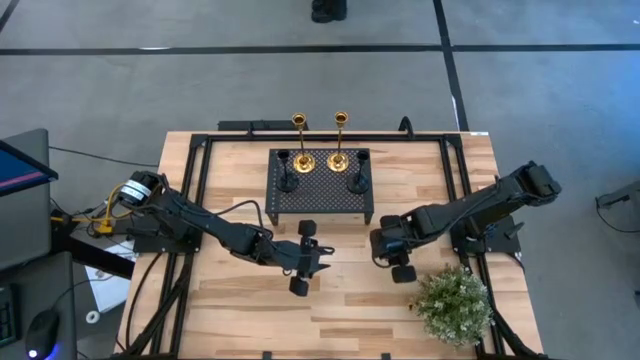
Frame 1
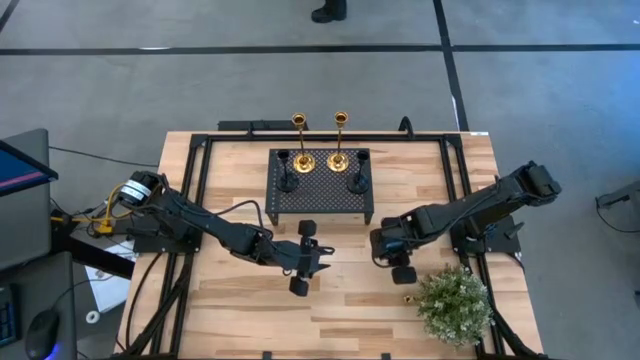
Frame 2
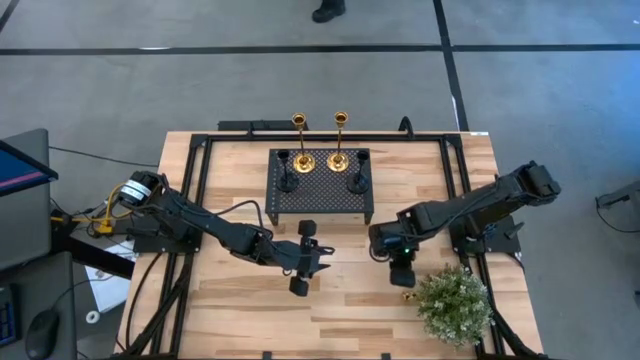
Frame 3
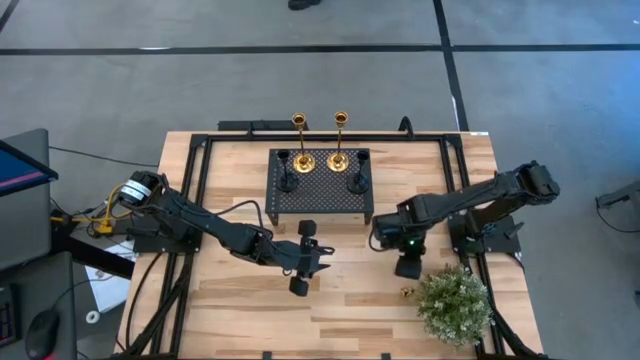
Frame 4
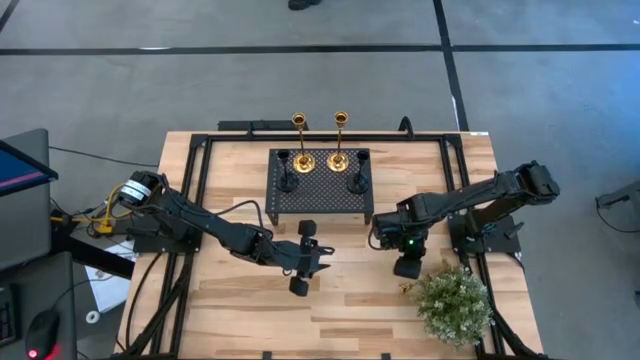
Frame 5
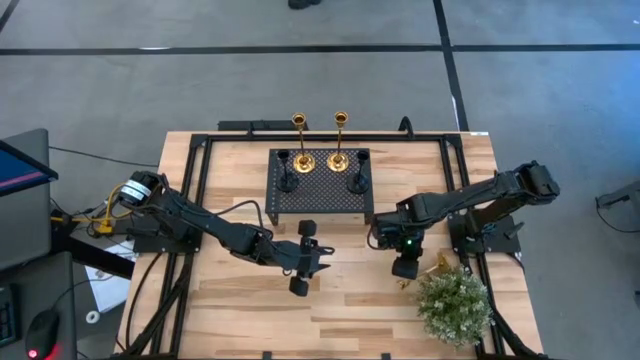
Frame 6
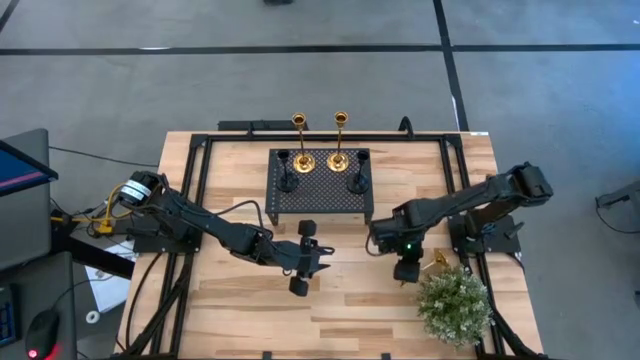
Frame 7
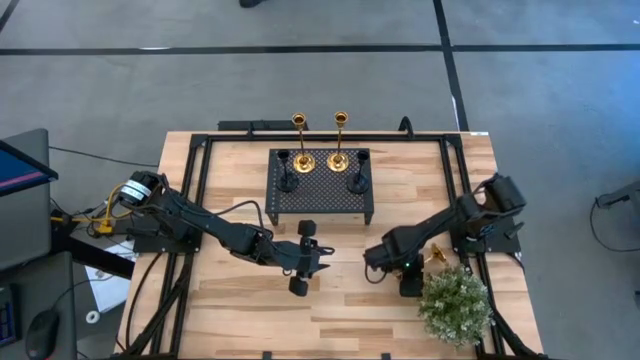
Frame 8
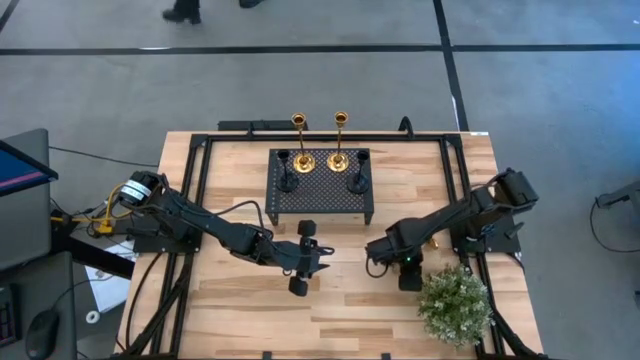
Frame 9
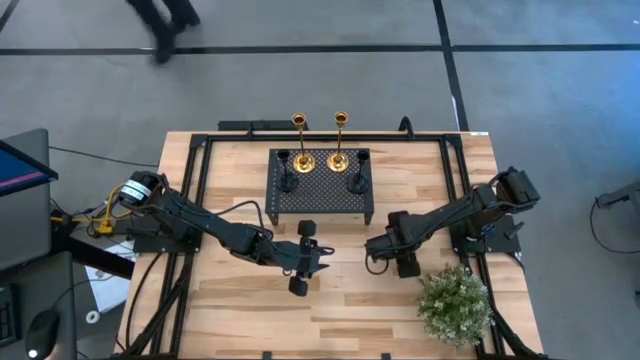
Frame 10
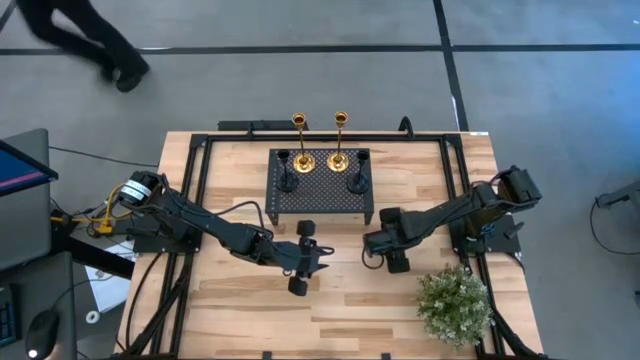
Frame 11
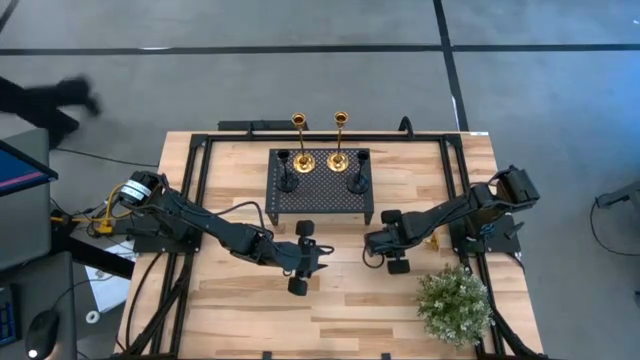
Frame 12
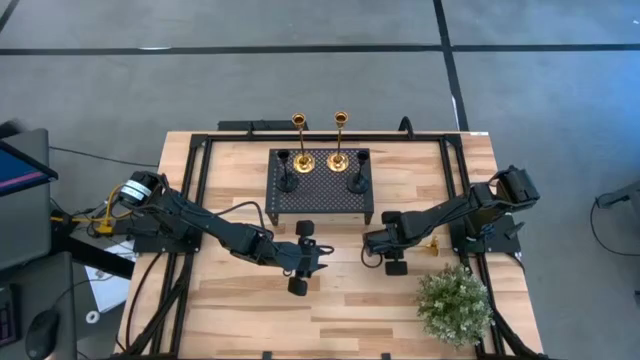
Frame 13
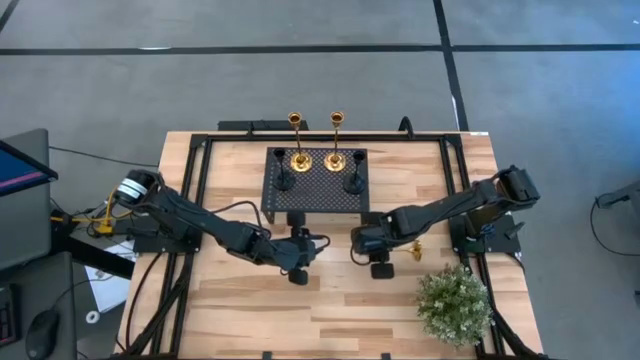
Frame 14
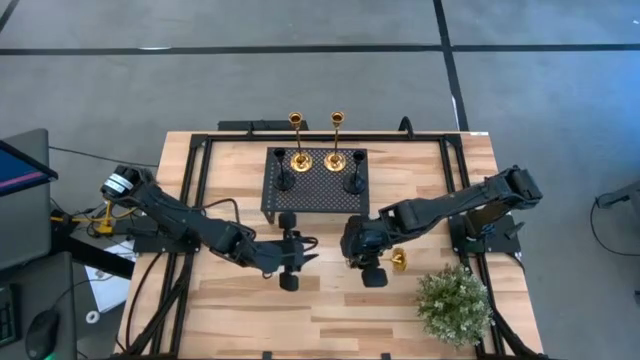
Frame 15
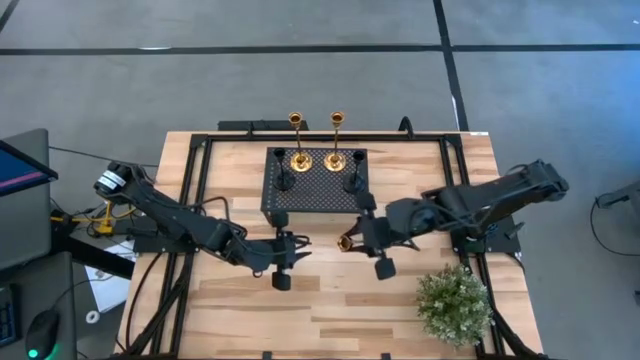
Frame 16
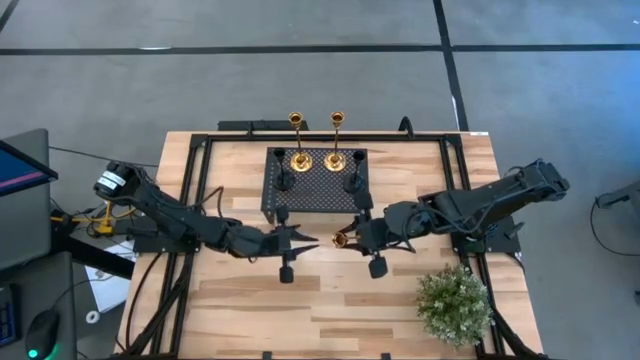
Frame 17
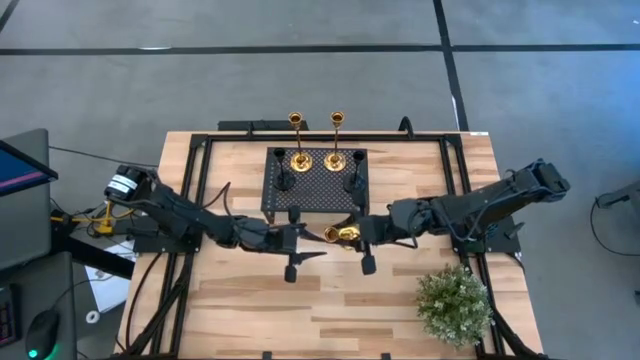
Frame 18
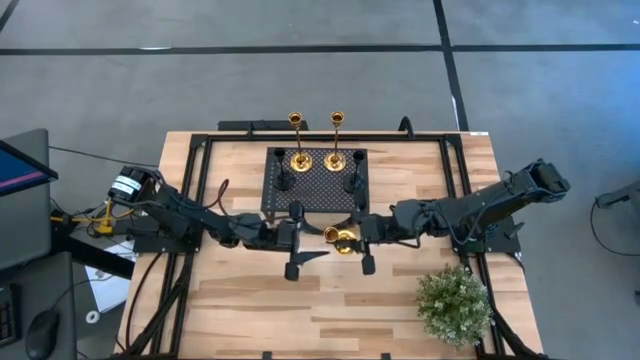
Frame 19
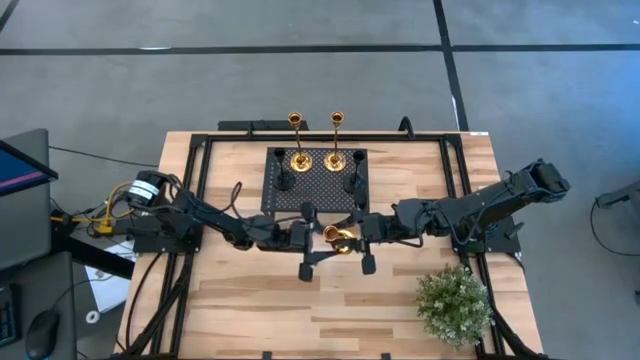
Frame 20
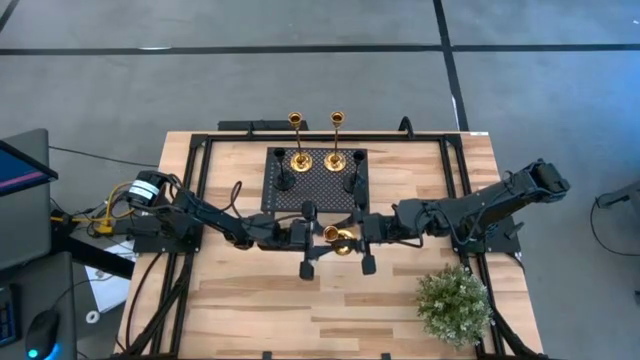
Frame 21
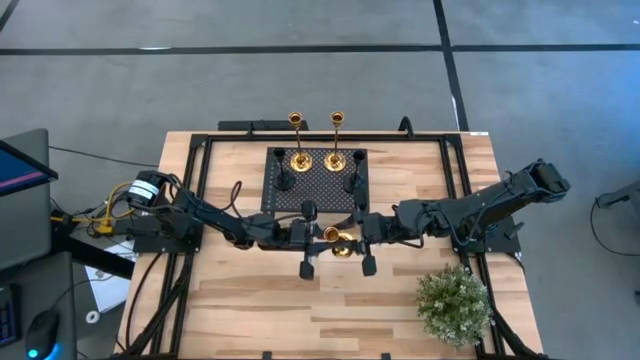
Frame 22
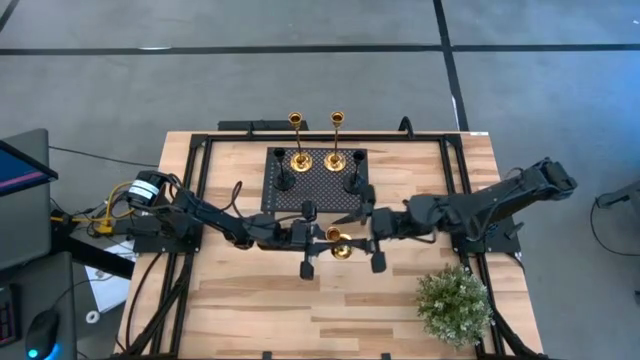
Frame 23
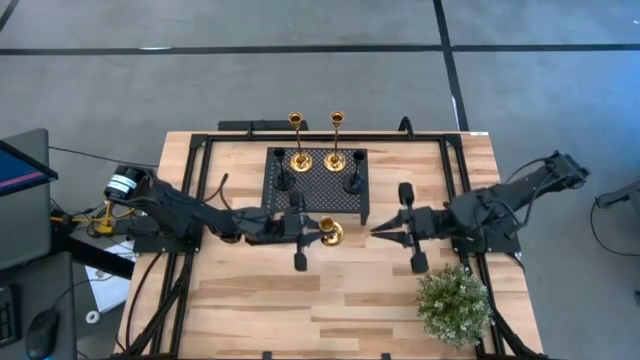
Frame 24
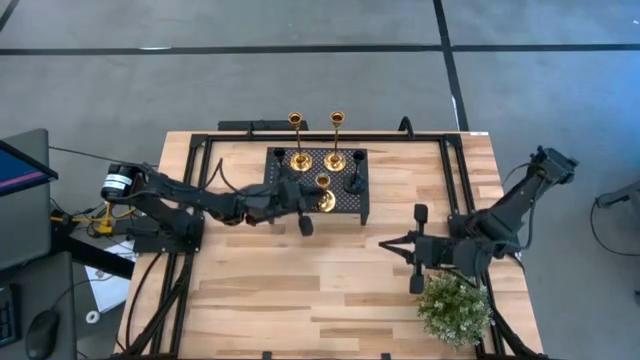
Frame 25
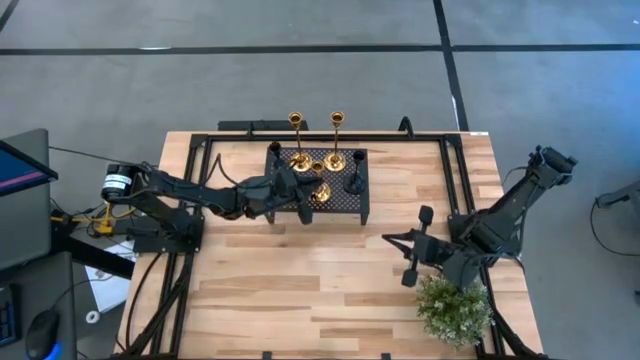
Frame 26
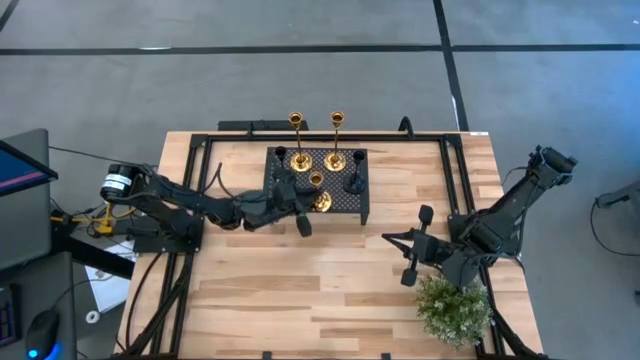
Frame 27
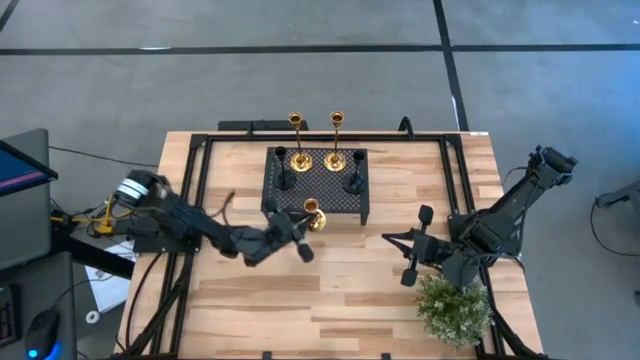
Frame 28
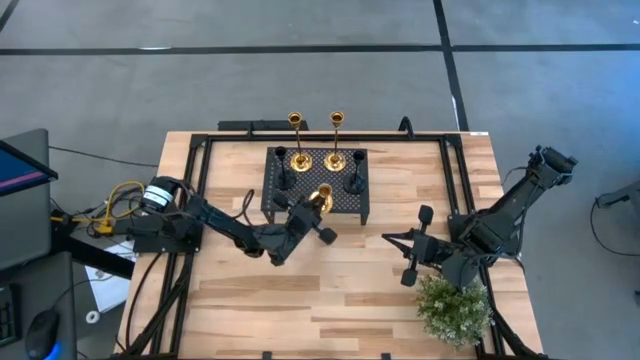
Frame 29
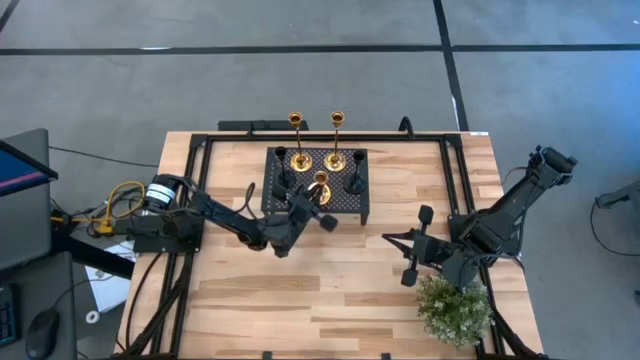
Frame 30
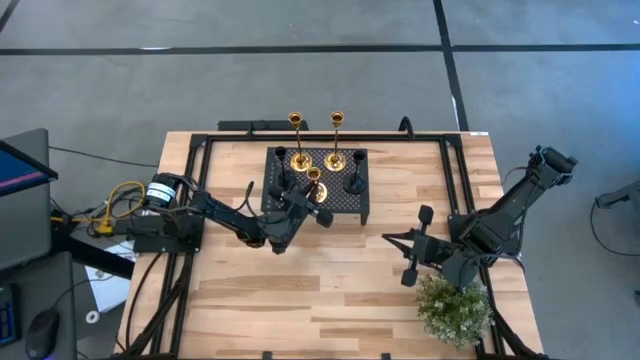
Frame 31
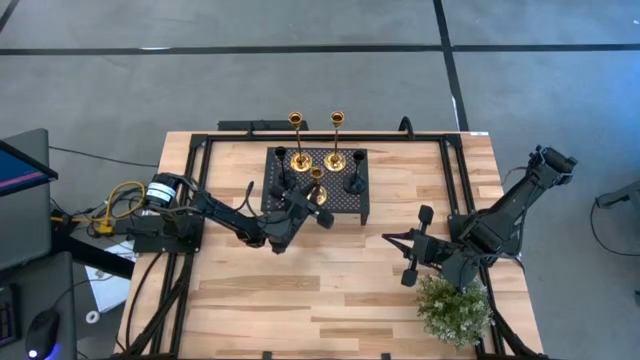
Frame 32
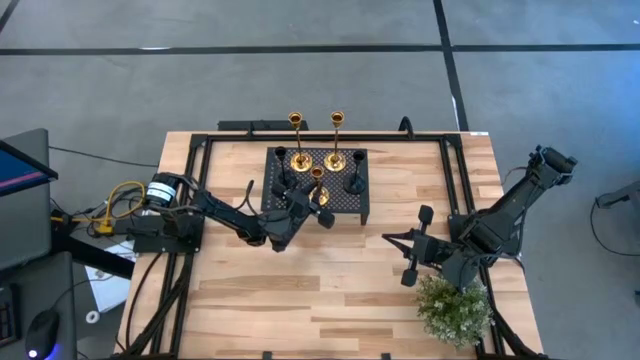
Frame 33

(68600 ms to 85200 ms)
Task: Pick & Place candle stick holders
Put the gold candle holder on the shelf

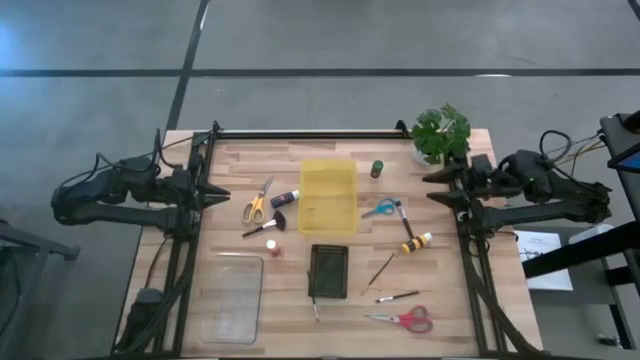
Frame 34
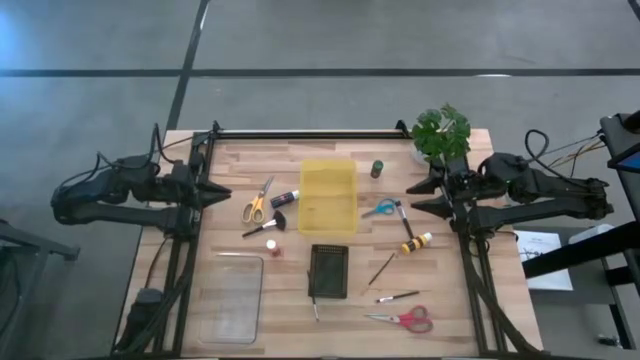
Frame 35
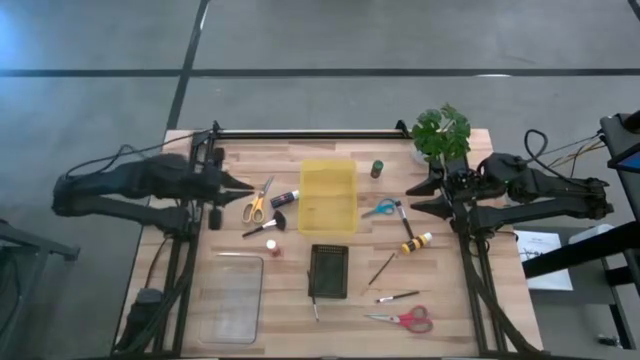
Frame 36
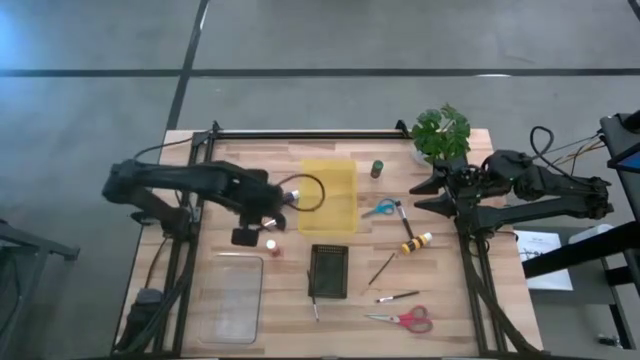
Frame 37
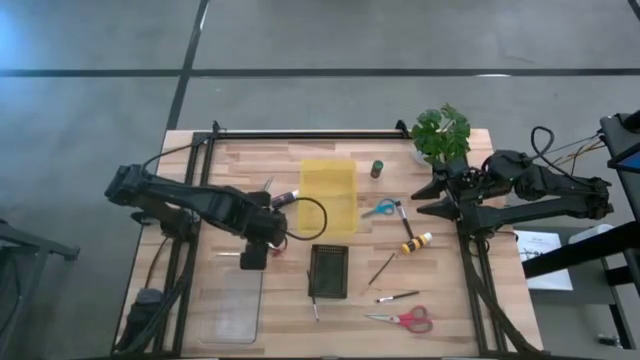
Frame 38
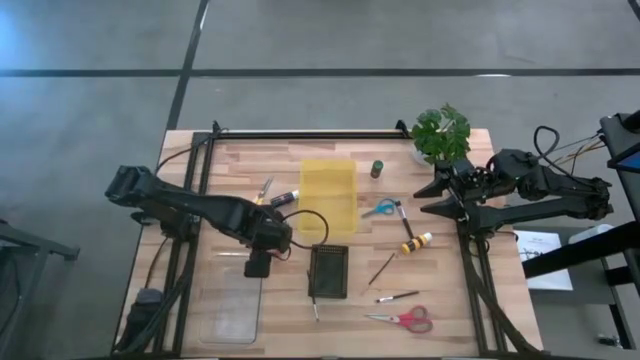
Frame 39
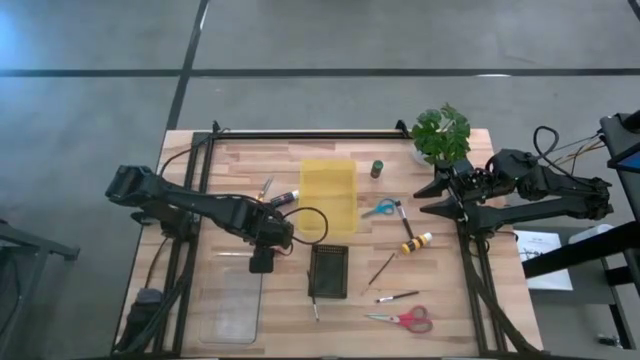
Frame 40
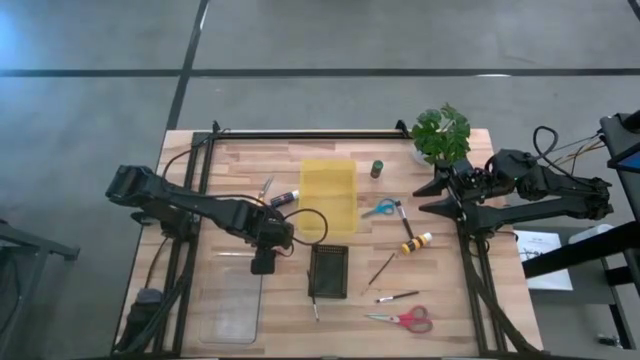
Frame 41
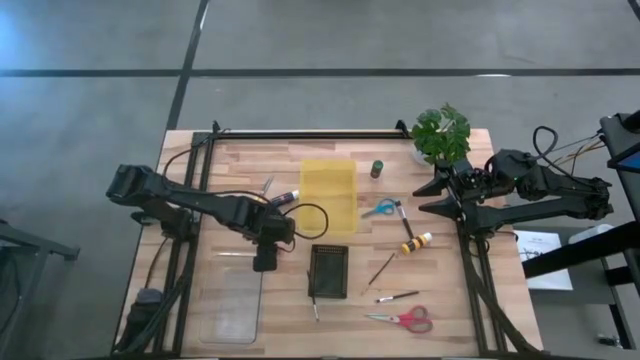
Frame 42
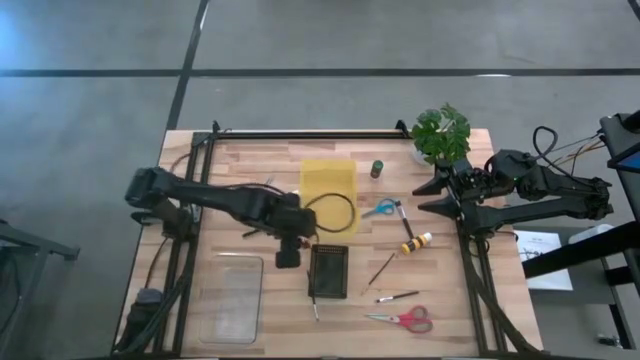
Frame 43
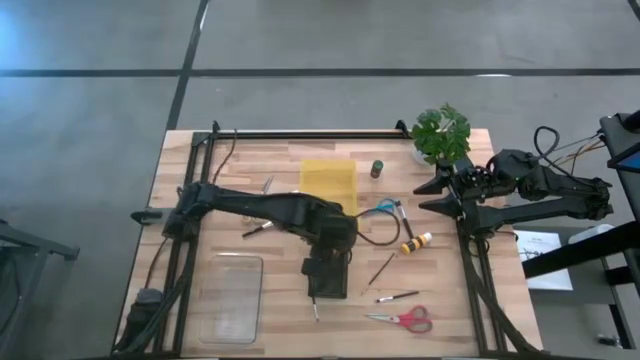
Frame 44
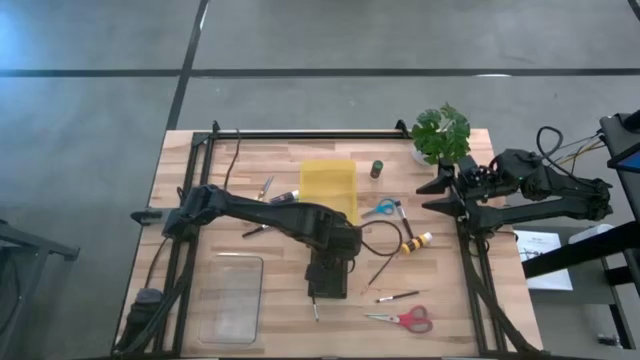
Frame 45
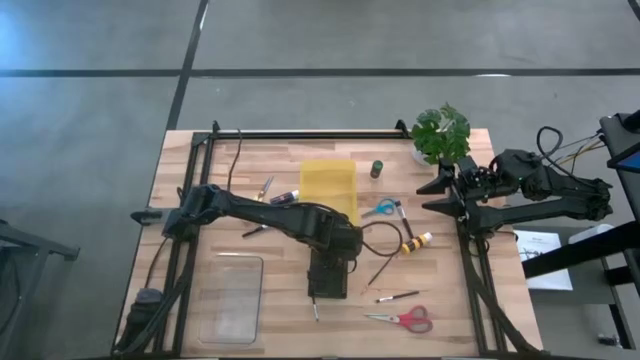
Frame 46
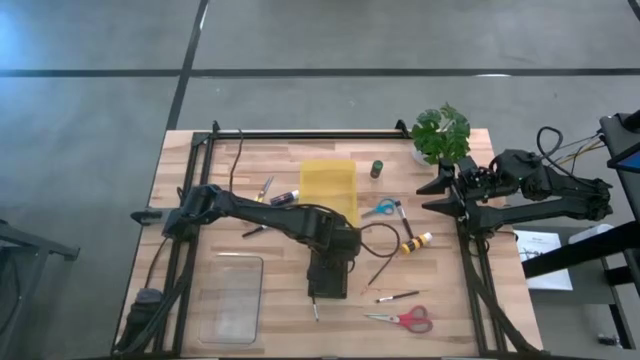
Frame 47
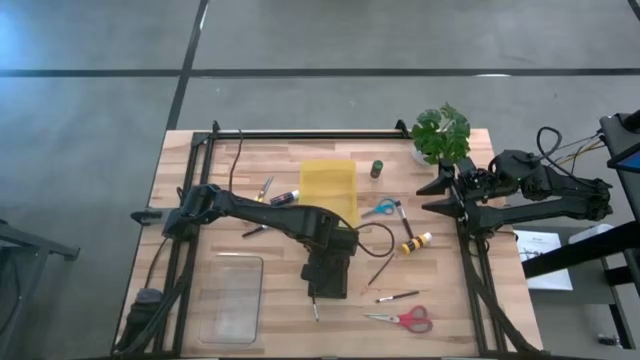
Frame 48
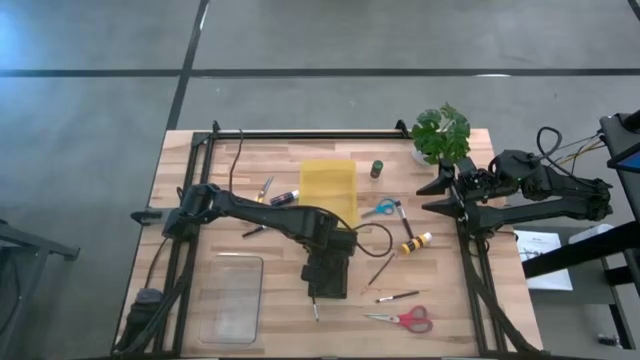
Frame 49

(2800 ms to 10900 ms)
Task: Pick & Place Paint Supplies
Put the orange paint bottle into the black bin
